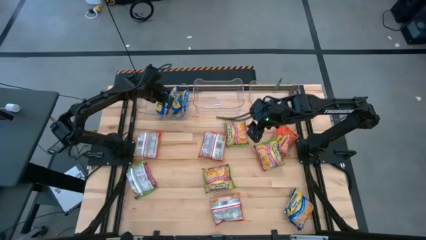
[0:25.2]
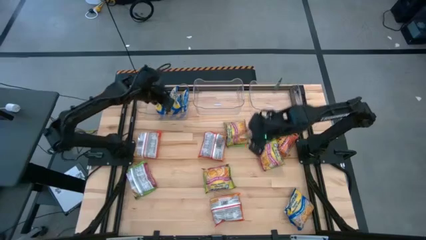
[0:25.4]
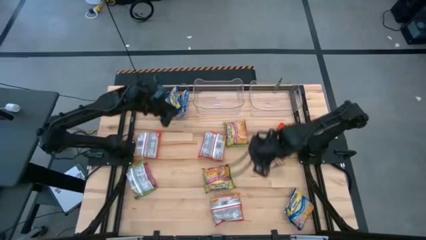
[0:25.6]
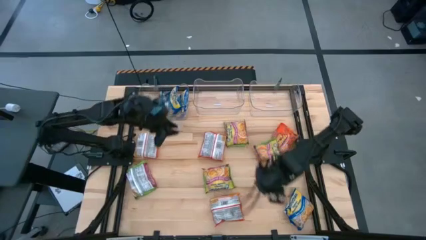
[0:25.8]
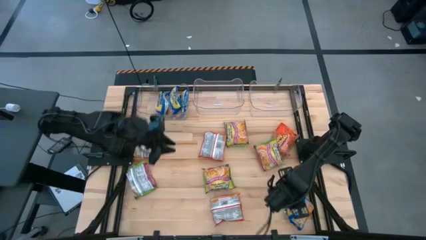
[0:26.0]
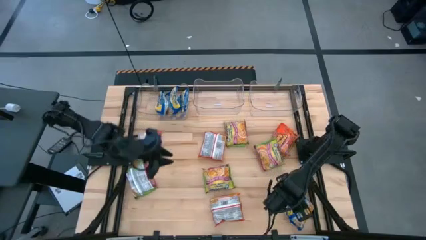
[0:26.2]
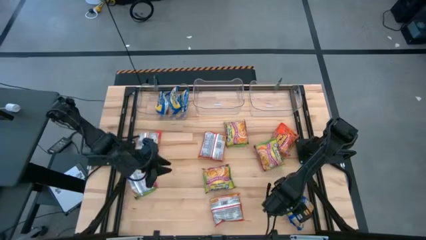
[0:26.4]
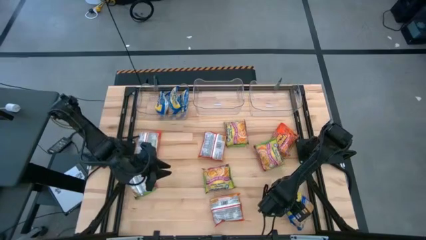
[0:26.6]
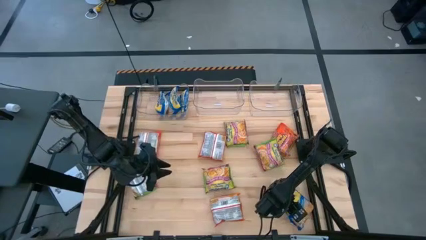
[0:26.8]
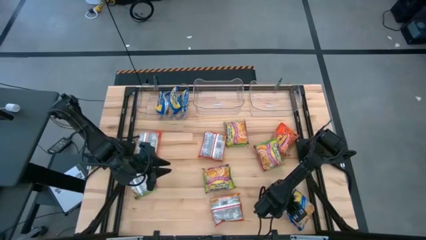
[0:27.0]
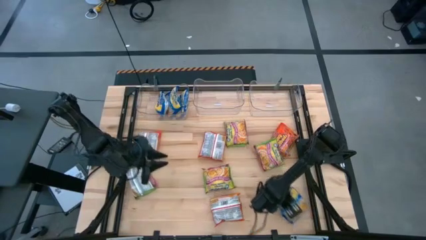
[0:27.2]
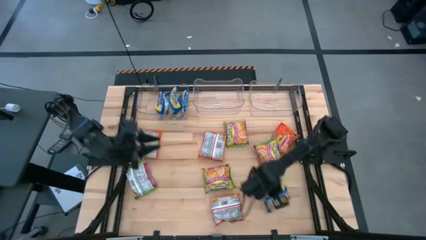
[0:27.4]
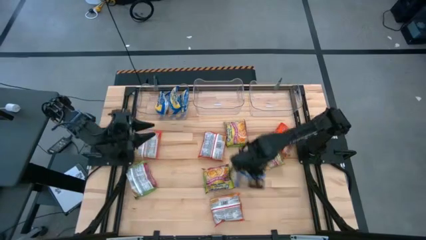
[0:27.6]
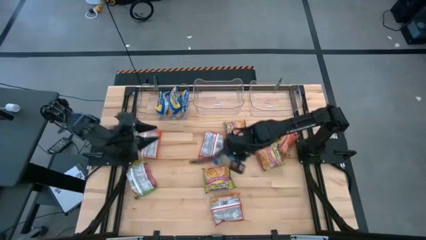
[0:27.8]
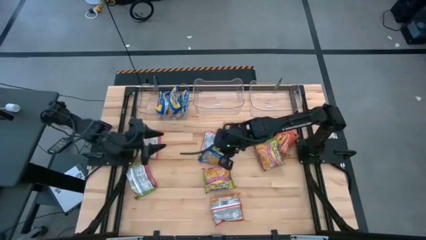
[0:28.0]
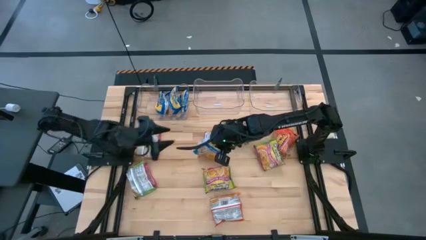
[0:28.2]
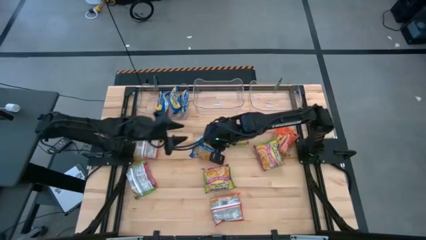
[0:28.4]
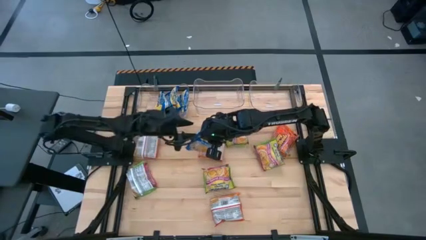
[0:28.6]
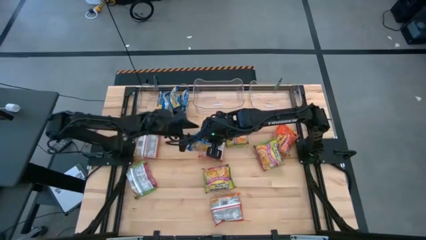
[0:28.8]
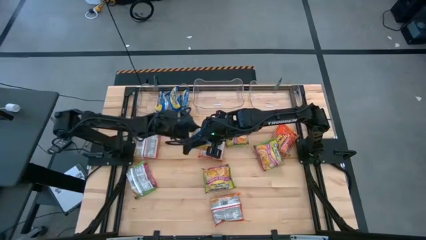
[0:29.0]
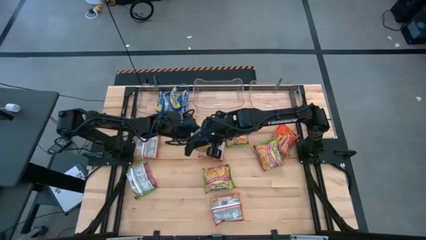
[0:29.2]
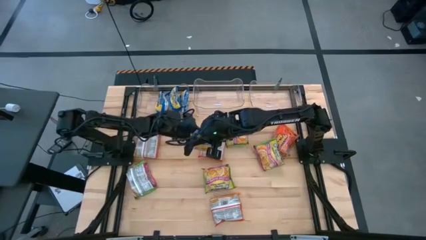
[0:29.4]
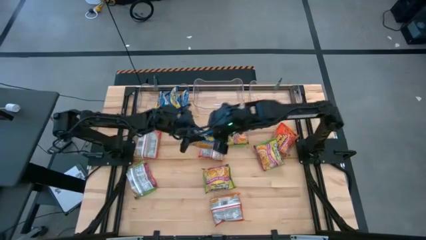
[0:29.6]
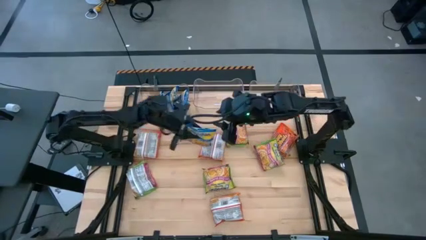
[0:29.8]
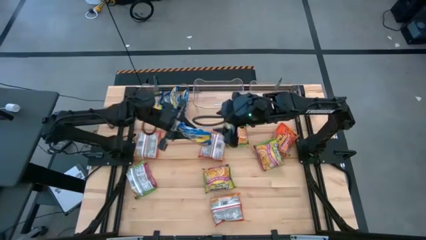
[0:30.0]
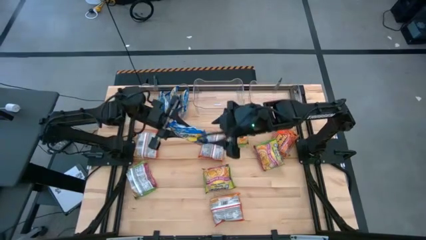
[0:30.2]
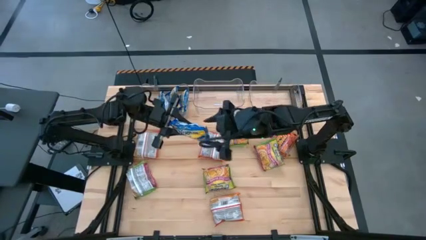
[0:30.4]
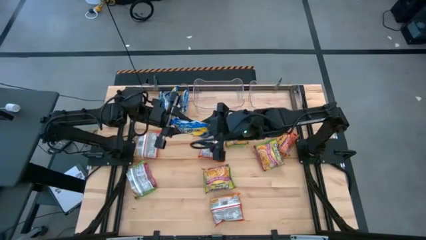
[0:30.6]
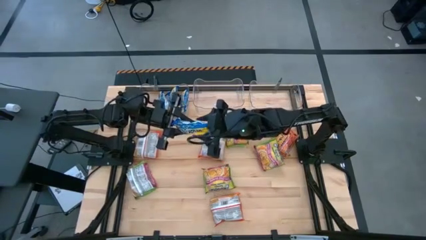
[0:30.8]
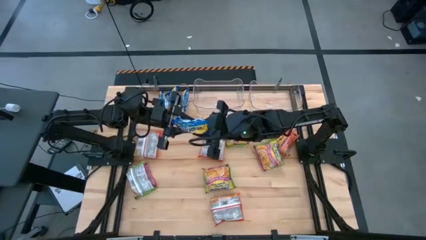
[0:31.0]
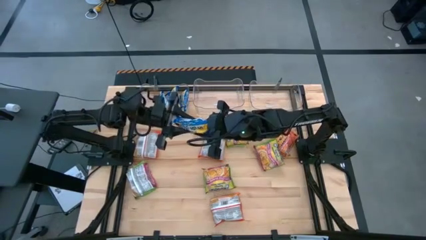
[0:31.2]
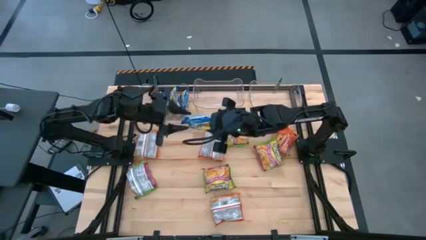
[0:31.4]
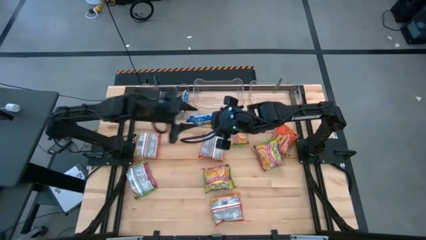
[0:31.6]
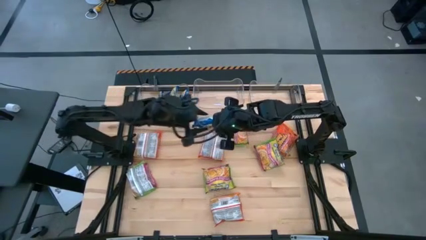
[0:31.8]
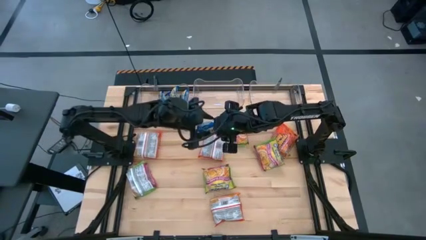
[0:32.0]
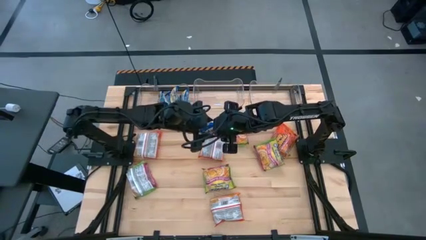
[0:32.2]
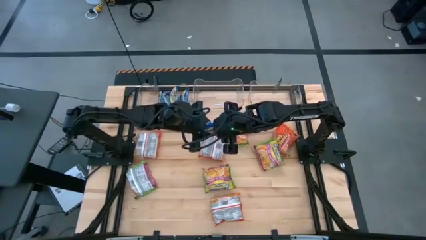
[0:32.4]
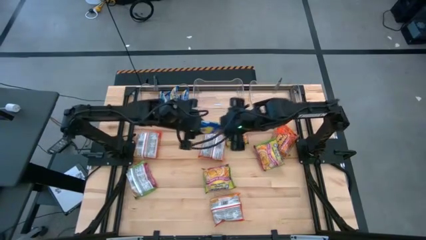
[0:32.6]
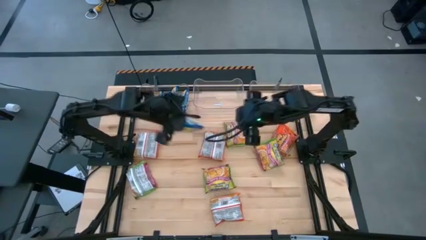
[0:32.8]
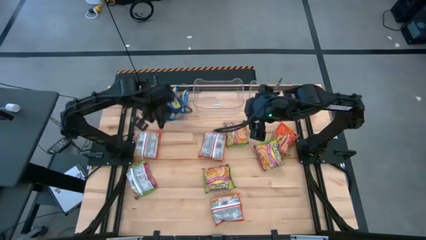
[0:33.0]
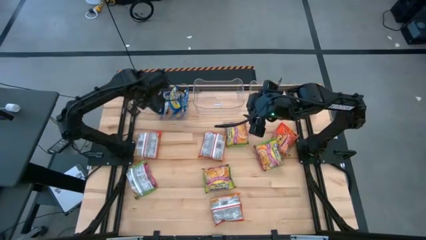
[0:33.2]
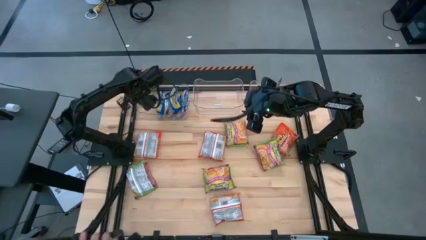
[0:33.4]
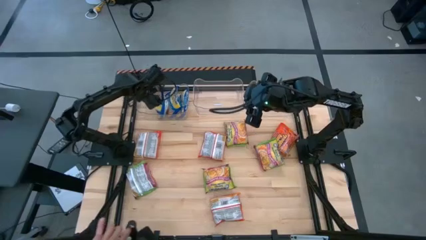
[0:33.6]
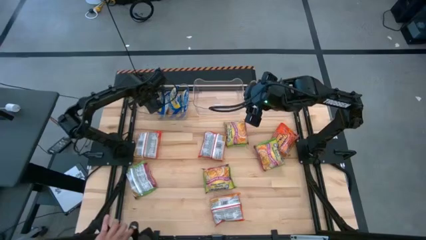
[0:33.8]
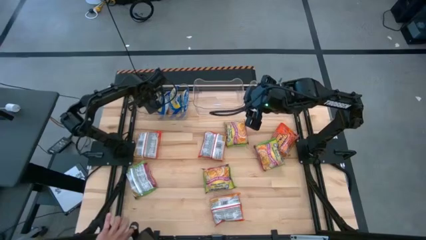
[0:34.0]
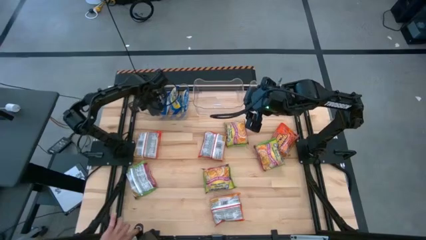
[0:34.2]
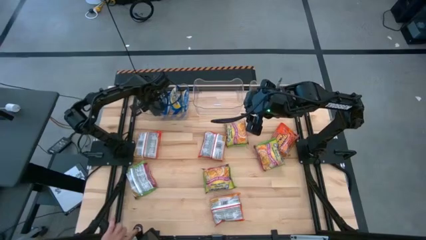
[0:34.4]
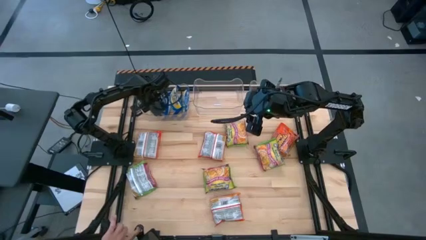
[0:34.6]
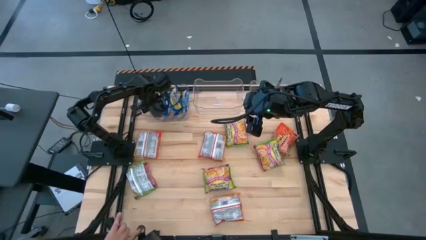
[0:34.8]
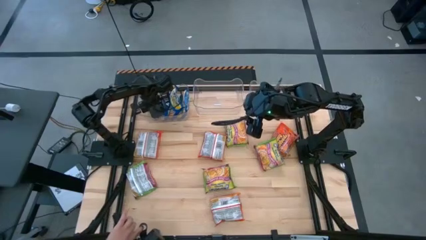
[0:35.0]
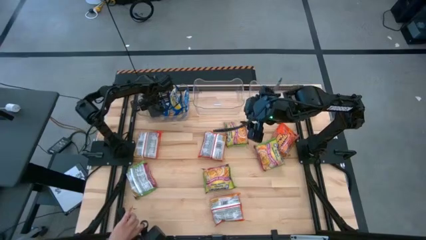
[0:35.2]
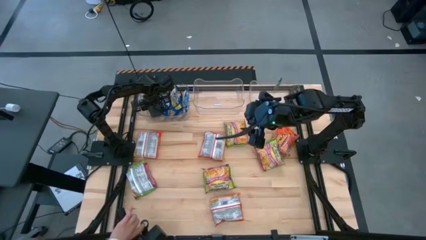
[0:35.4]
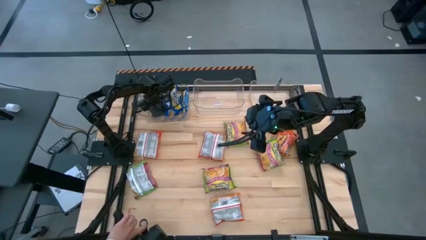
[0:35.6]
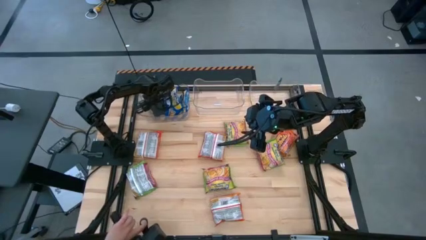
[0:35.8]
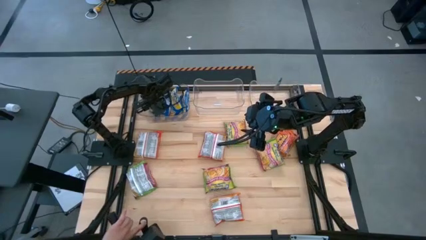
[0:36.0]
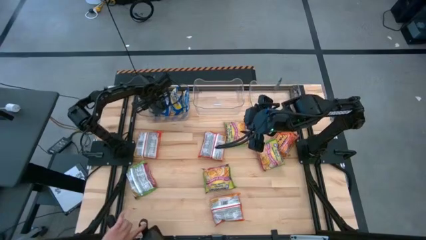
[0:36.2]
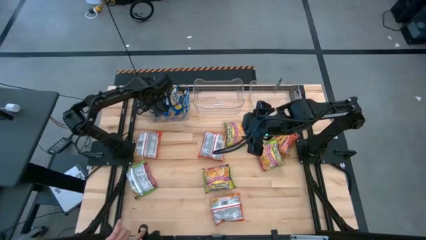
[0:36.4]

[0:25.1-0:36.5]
Task: Sort Maruchan noodles
Put the blue noodle pack into the left transparent bin
